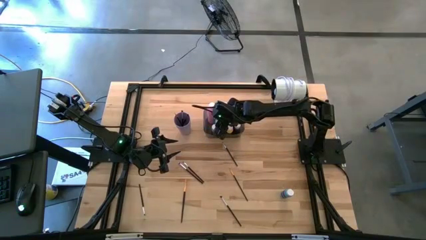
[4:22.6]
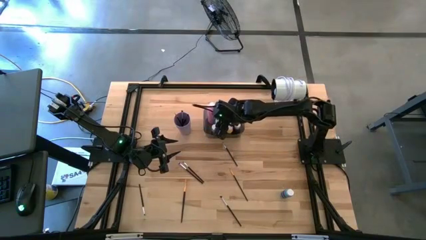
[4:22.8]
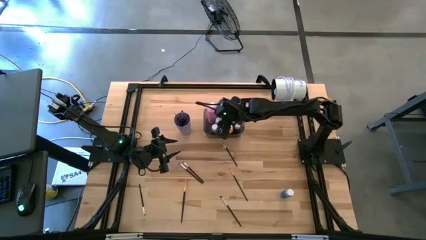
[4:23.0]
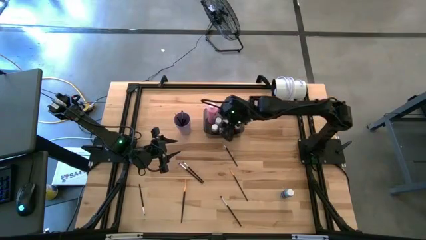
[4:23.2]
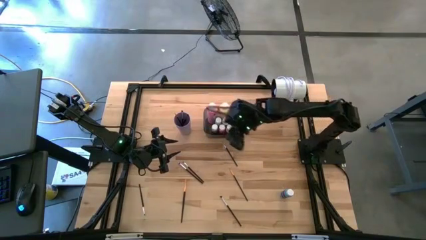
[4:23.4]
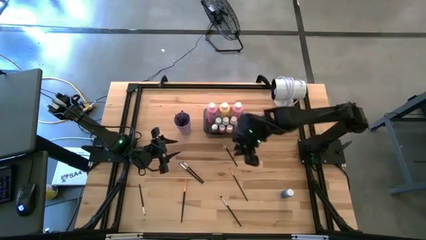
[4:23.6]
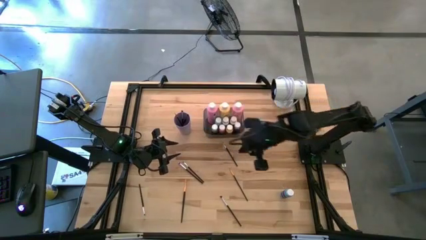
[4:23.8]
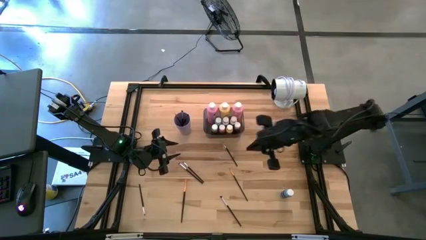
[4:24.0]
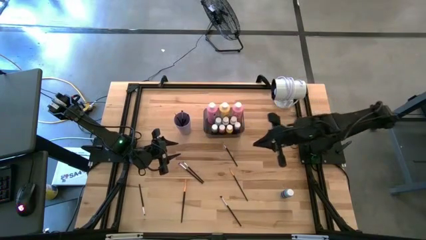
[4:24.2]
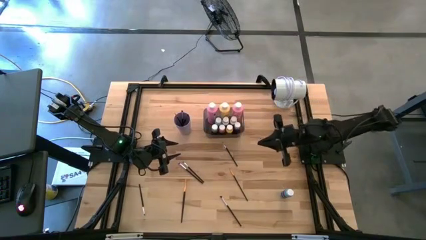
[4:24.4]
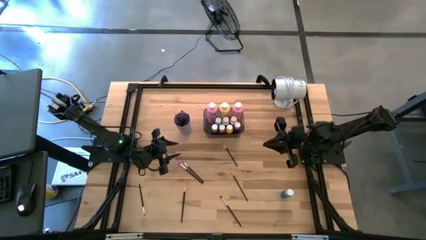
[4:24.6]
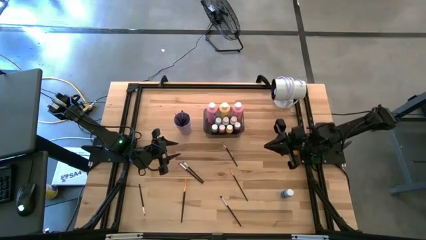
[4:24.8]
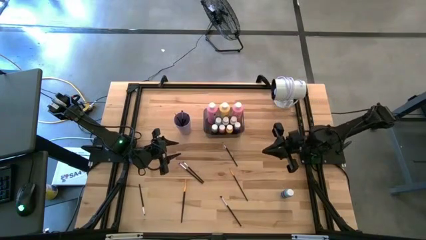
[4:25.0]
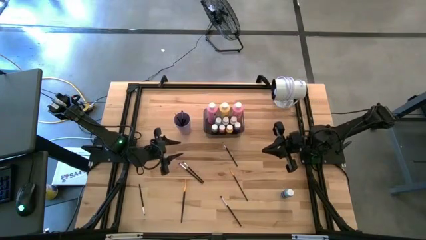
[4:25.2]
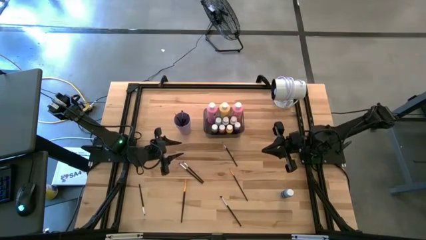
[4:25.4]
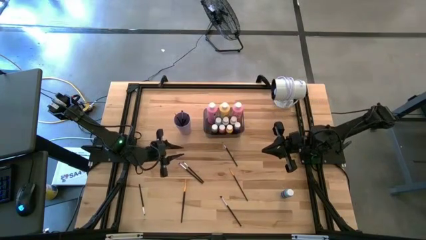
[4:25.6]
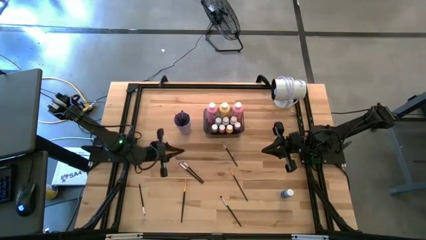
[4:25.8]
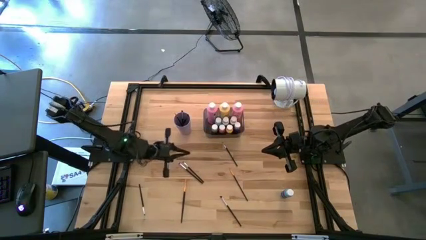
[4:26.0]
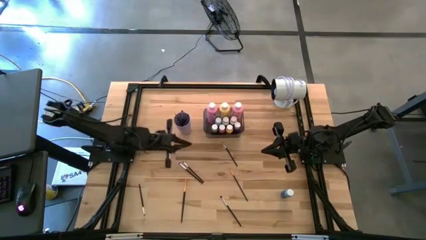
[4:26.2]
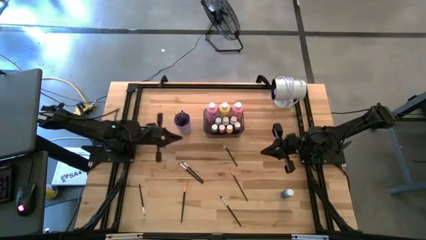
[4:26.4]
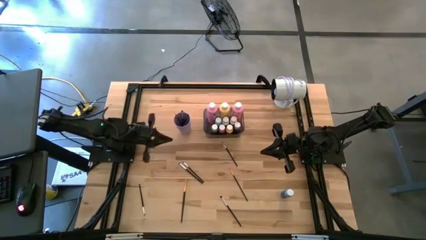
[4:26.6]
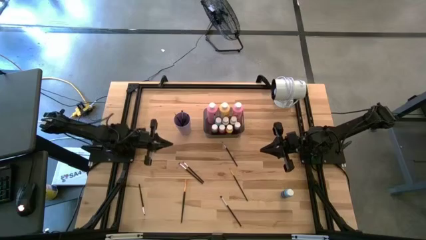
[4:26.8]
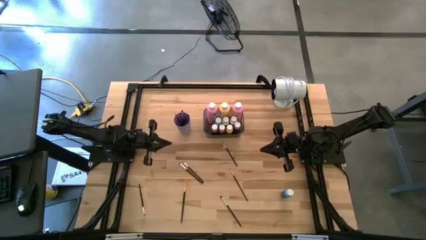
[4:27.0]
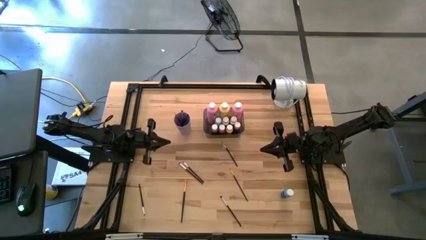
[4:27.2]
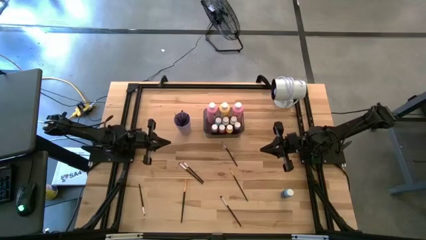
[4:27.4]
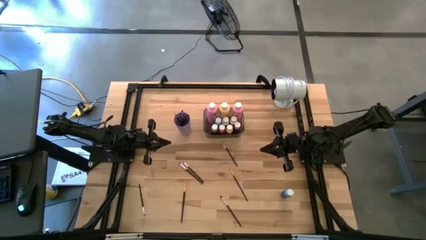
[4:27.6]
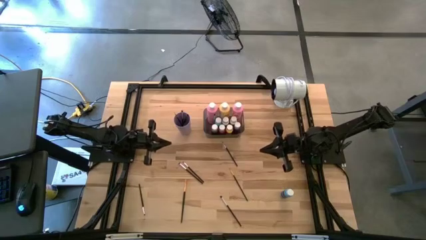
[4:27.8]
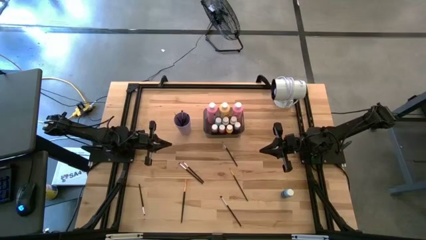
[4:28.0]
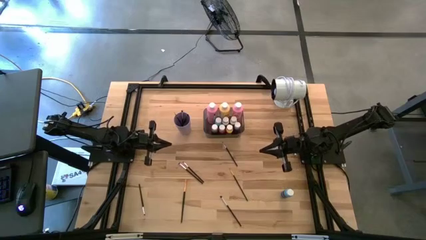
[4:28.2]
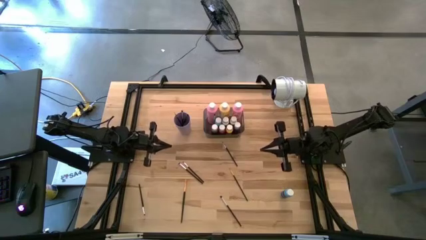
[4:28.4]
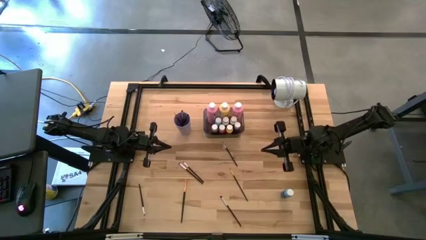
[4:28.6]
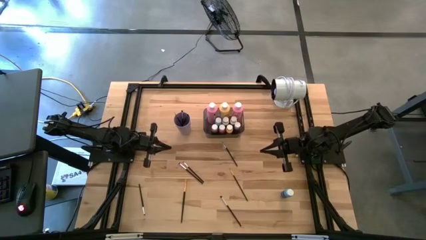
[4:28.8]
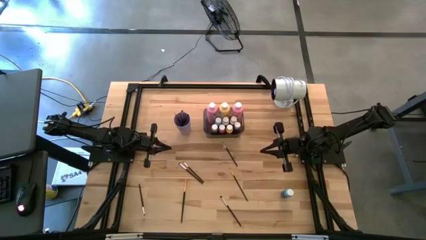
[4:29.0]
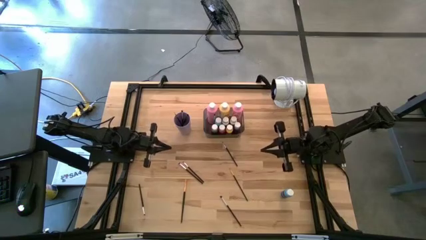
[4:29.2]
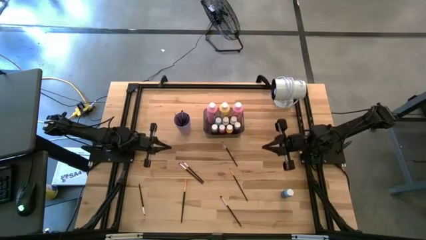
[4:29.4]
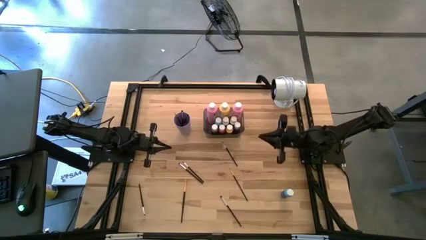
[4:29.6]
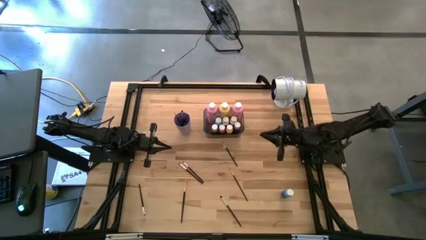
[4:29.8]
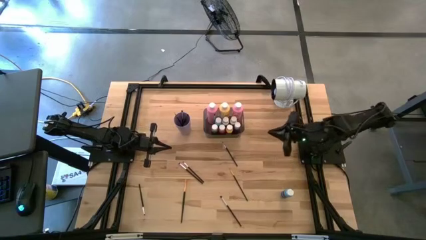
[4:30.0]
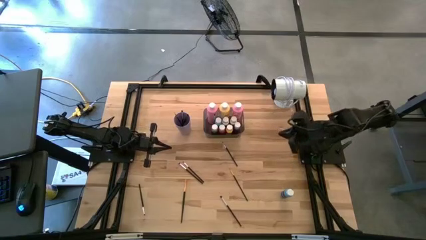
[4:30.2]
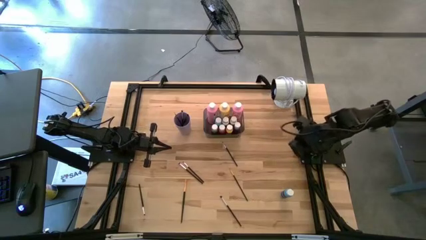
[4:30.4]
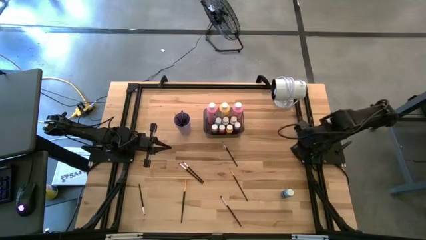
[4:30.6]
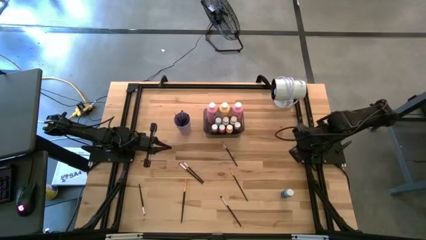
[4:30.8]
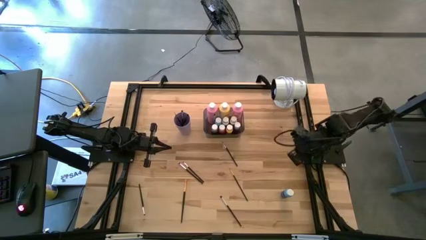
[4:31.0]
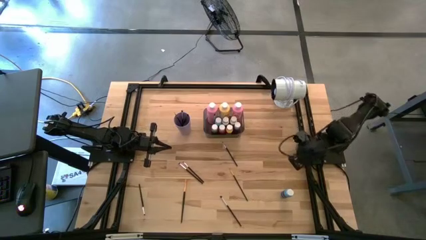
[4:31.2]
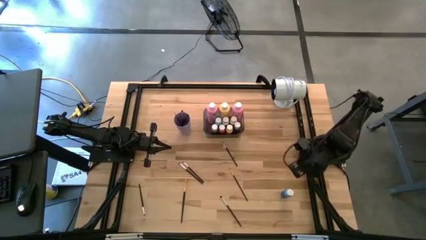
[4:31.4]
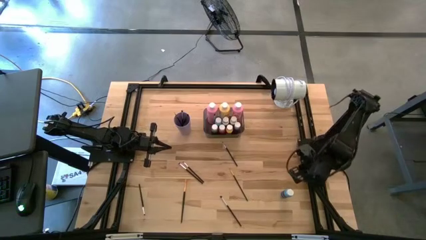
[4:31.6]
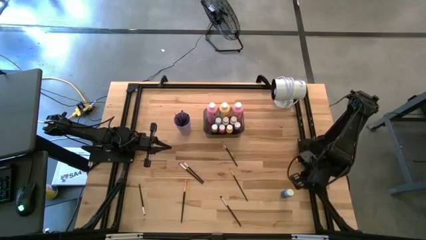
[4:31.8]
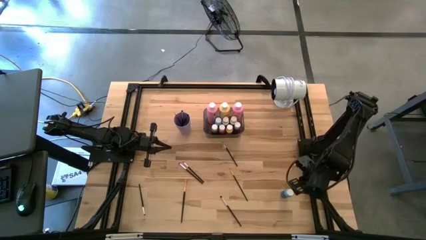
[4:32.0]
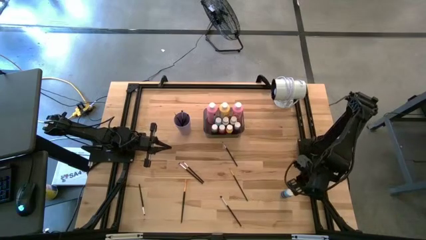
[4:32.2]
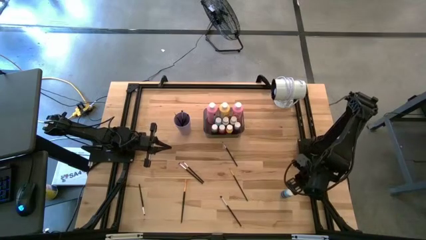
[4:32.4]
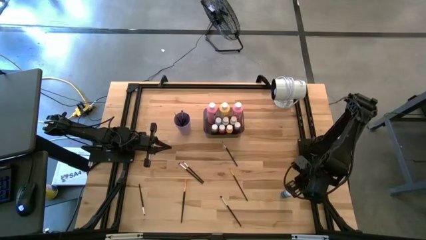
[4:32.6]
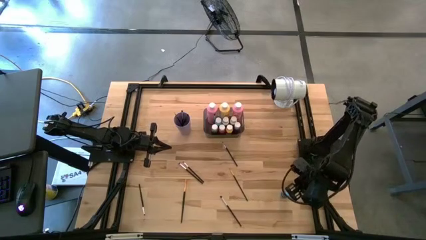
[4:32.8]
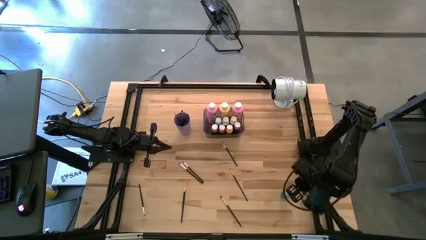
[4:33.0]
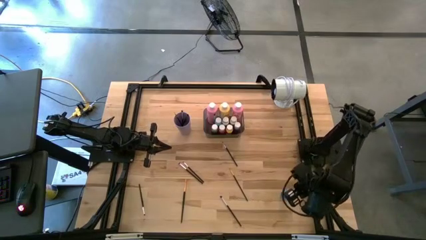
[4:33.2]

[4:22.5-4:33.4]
Task: Pick & Place Paint Supplies
Put the small blue paint bottle into the gray bin

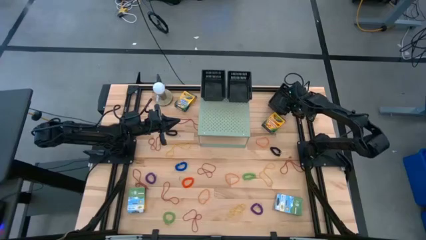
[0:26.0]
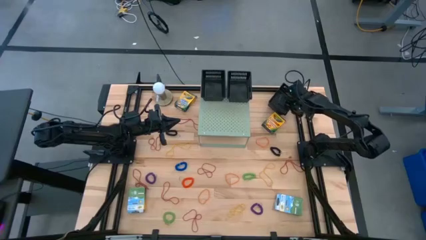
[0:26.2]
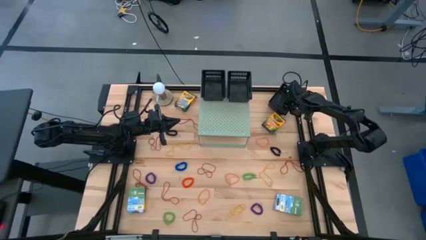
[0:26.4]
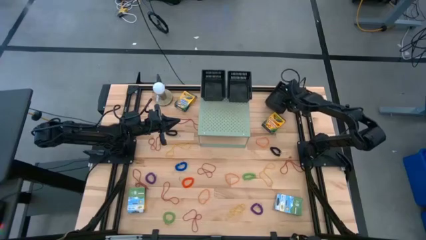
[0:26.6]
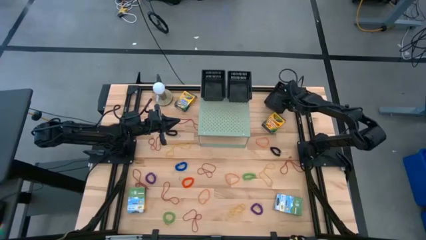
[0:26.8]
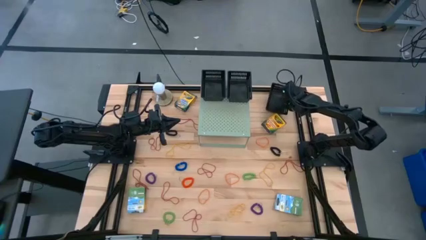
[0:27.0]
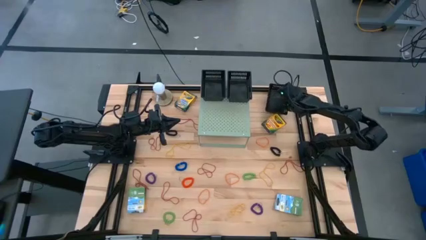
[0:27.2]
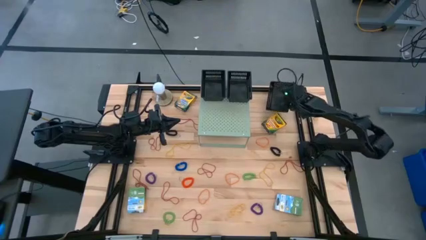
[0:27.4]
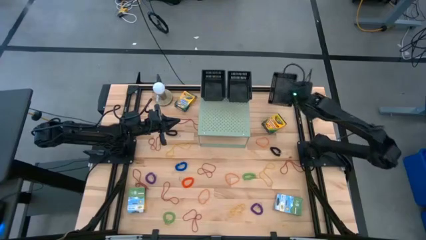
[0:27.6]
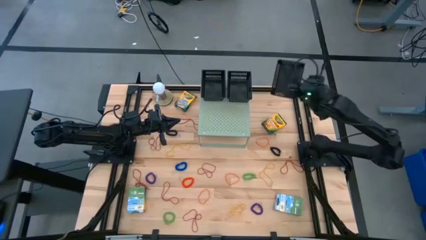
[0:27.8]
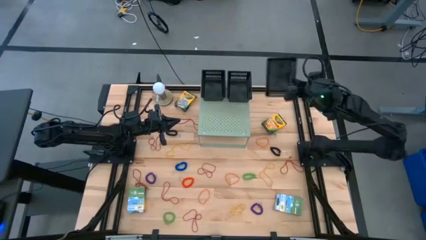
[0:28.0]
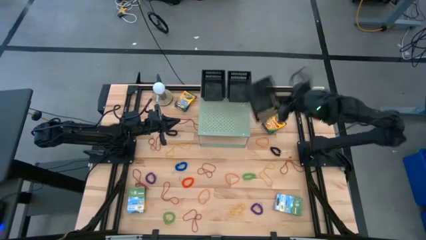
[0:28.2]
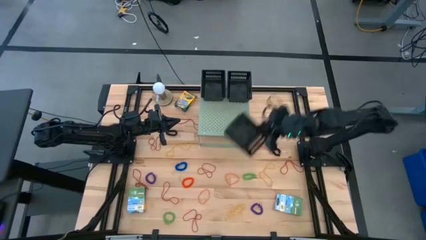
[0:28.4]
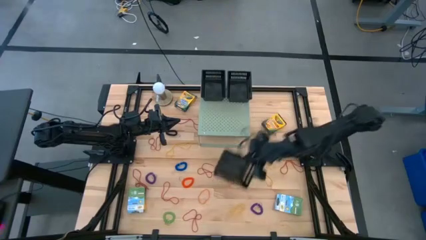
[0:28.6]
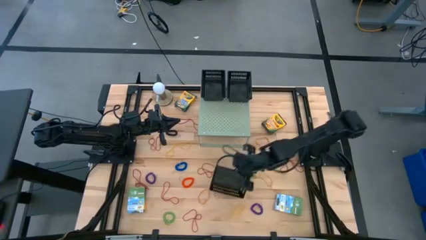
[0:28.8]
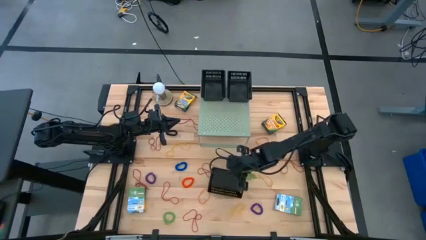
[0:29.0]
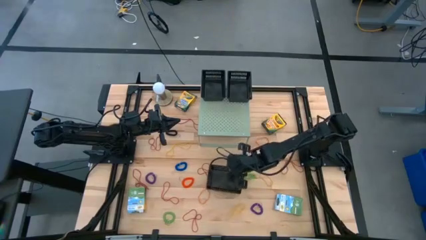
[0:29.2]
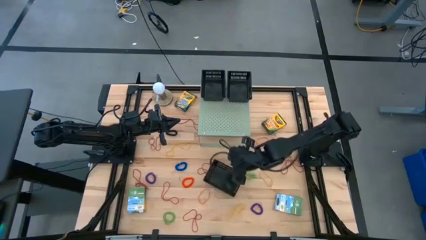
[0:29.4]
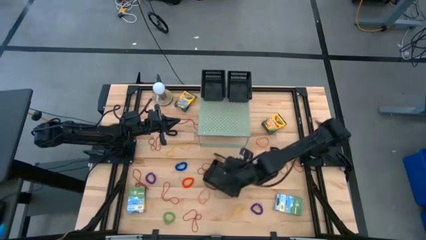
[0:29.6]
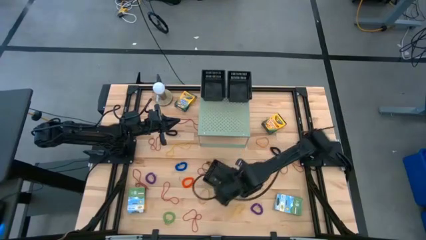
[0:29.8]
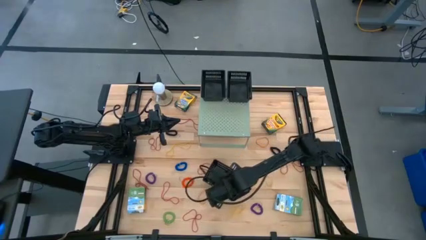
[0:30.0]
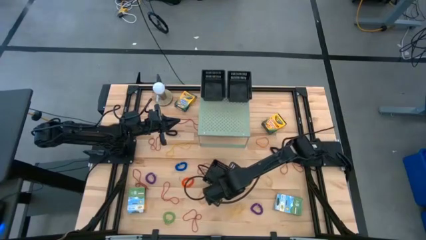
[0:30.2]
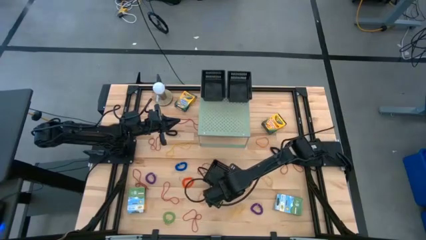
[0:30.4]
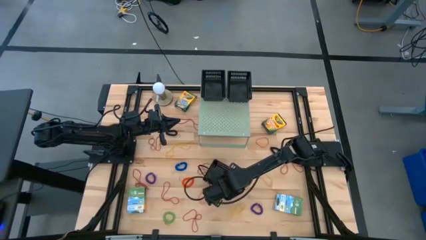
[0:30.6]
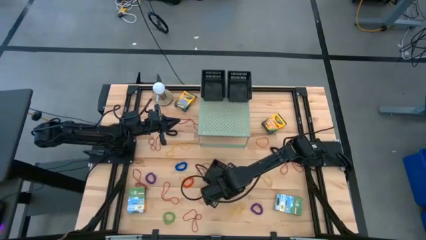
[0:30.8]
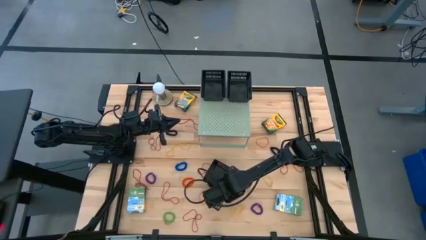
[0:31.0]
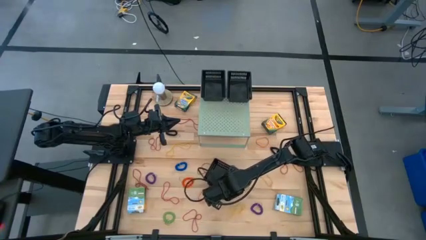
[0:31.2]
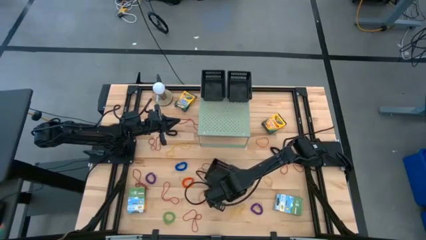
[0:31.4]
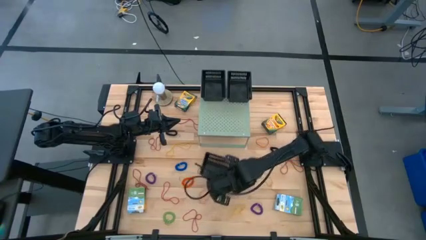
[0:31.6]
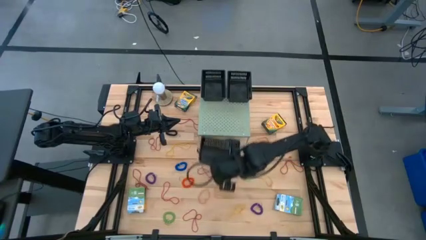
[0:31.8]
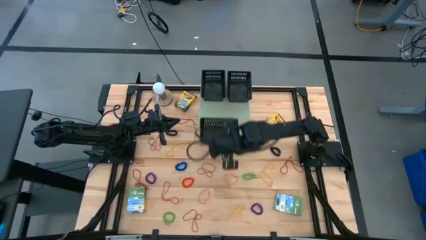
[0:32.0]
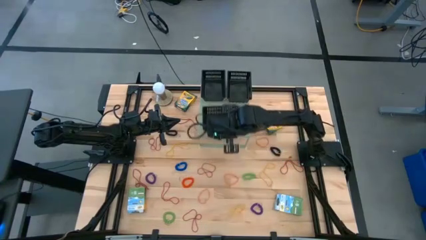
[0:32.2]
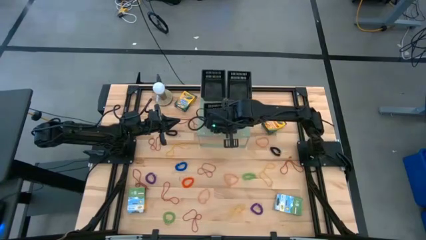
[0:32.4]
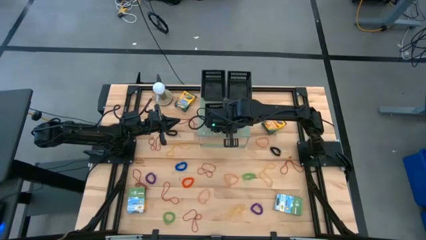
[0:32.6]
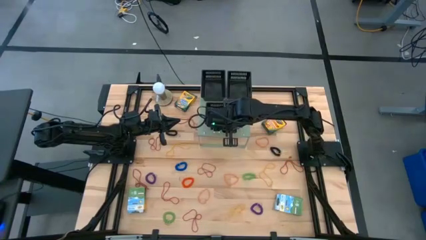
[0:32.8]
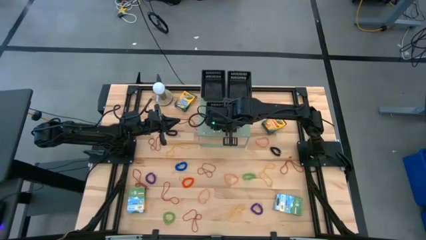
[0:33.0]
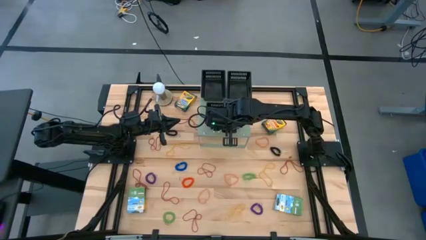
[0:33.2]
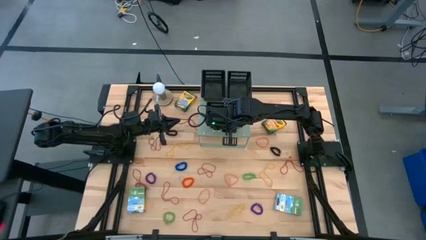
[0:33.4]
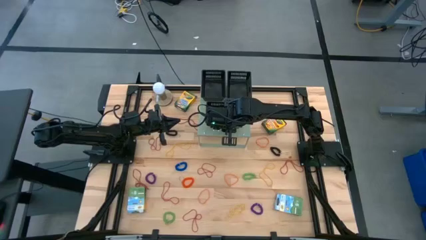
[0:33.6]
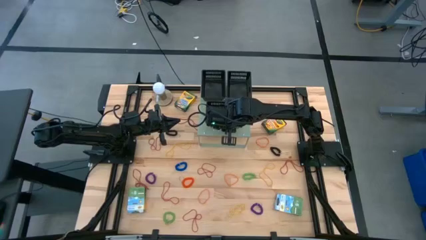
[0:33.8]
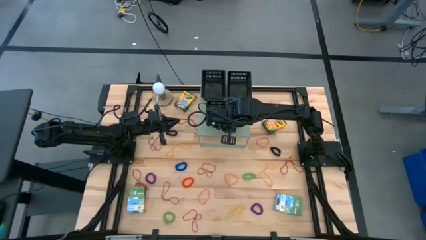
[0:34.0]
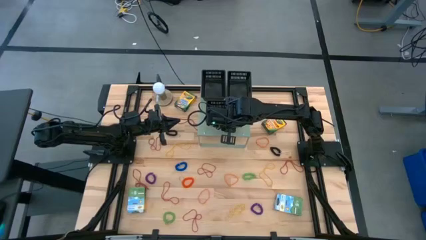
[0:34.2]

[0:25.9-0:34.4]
Task: Pick & Place Office Desk Supplies
Put the black bin on the shelf
